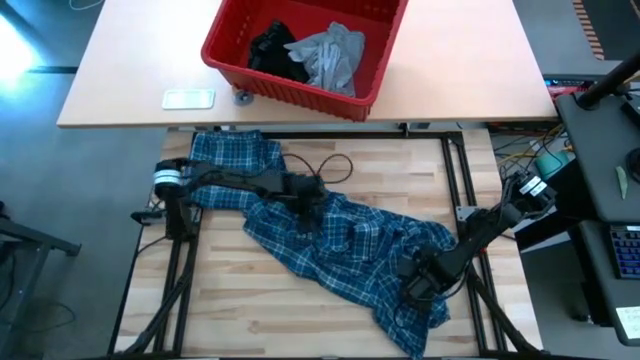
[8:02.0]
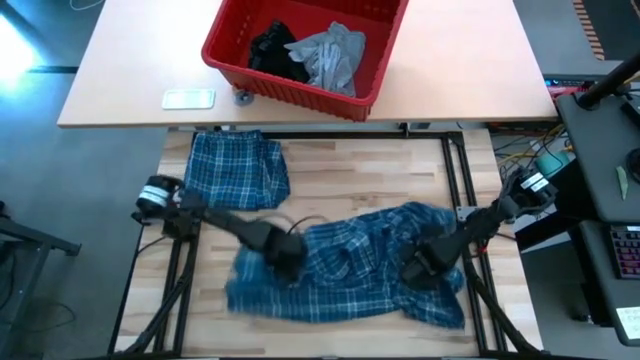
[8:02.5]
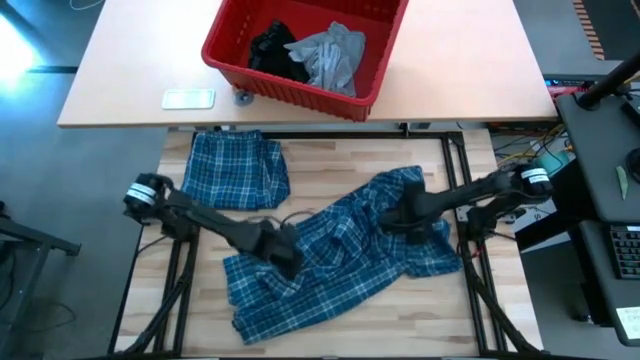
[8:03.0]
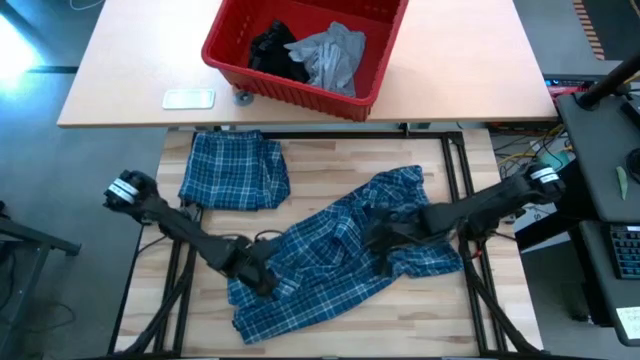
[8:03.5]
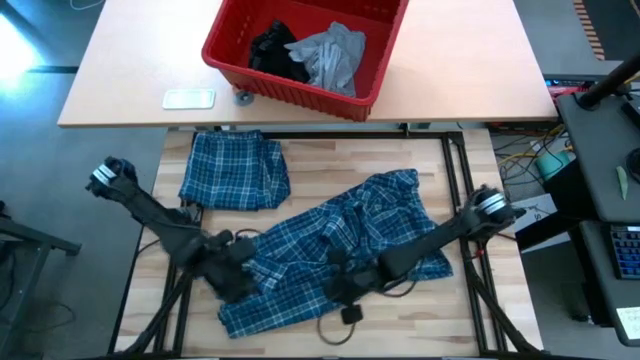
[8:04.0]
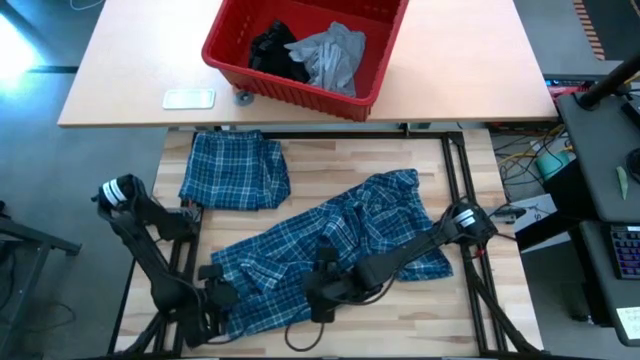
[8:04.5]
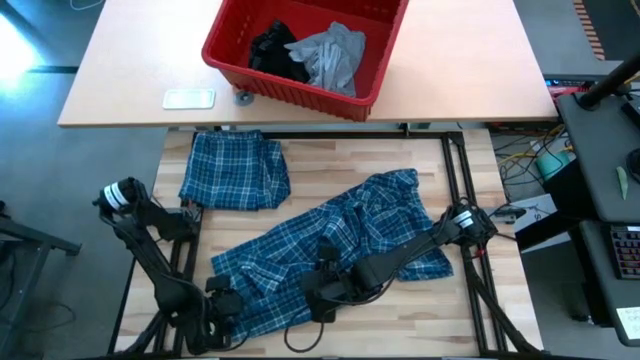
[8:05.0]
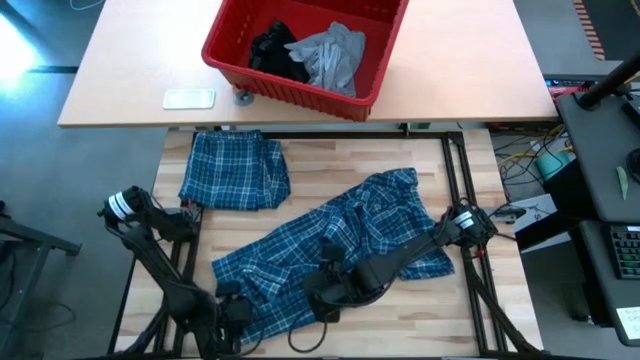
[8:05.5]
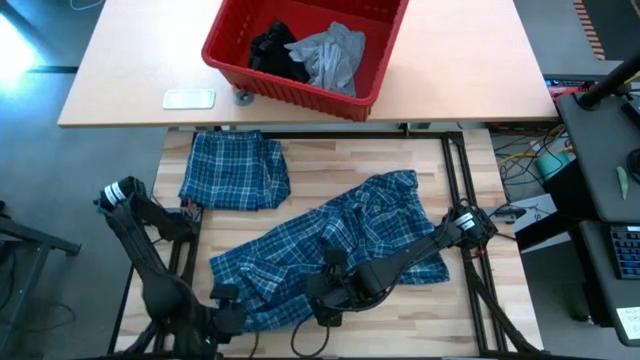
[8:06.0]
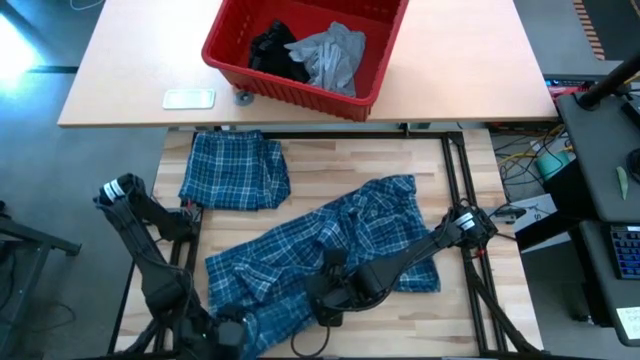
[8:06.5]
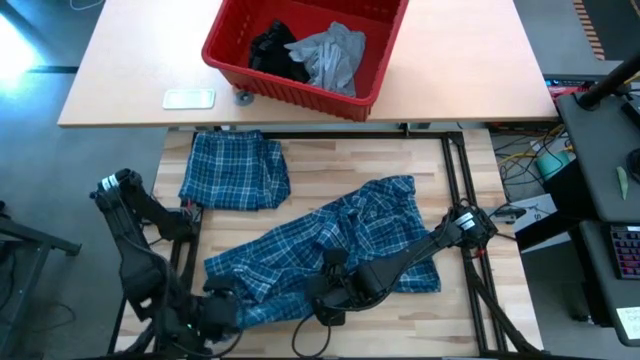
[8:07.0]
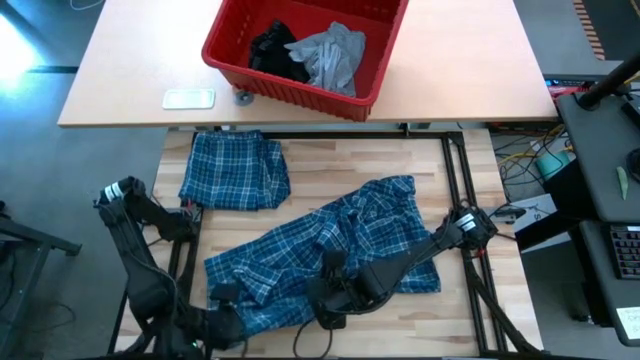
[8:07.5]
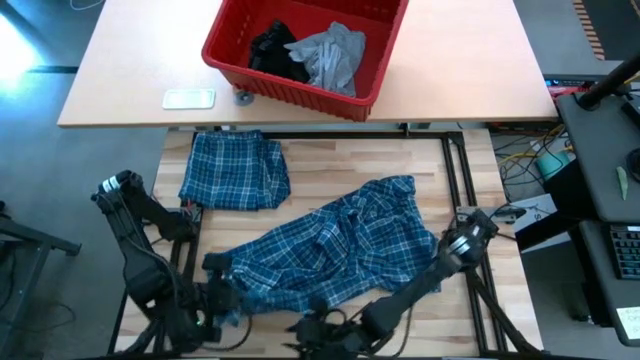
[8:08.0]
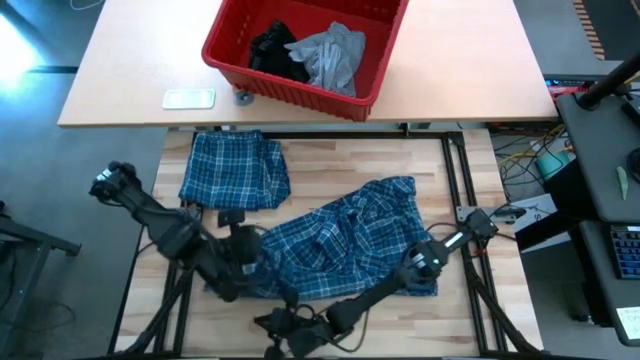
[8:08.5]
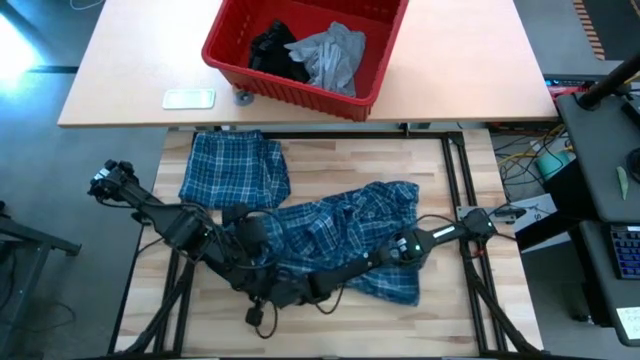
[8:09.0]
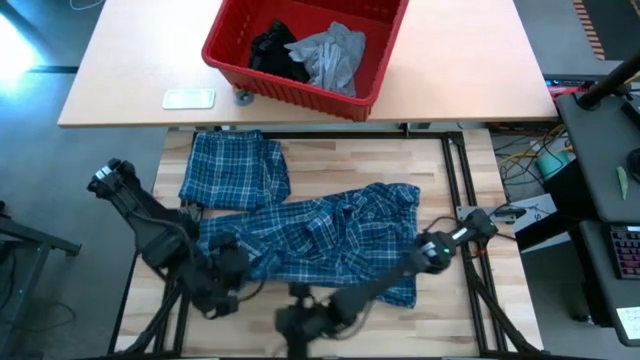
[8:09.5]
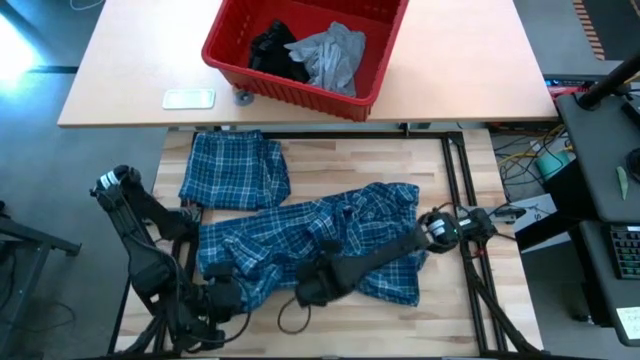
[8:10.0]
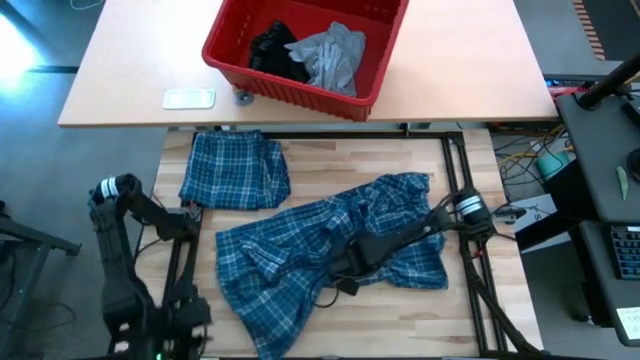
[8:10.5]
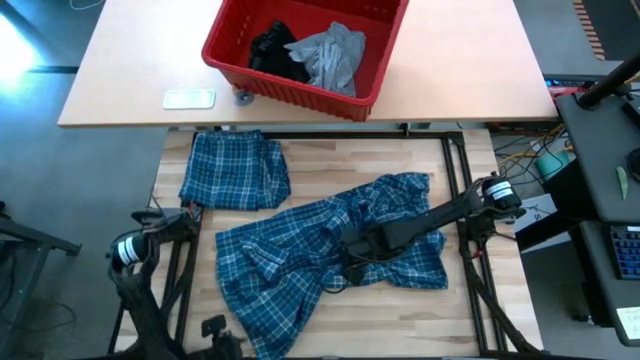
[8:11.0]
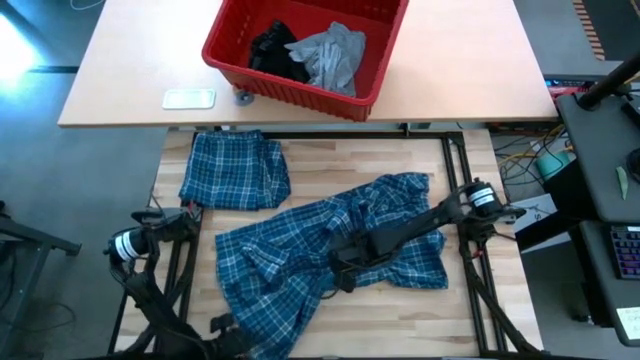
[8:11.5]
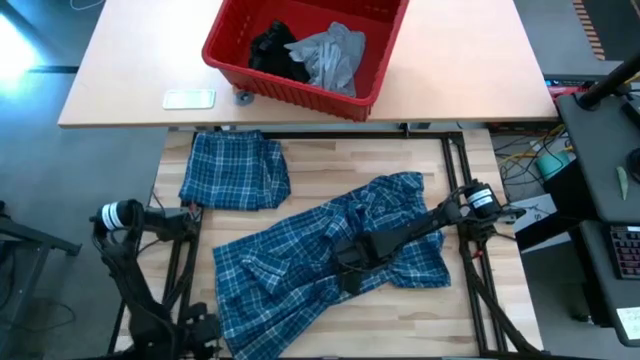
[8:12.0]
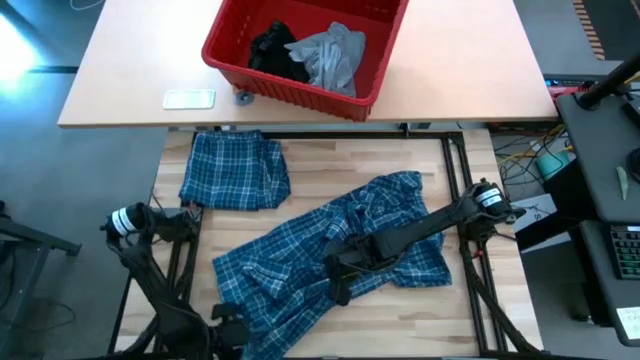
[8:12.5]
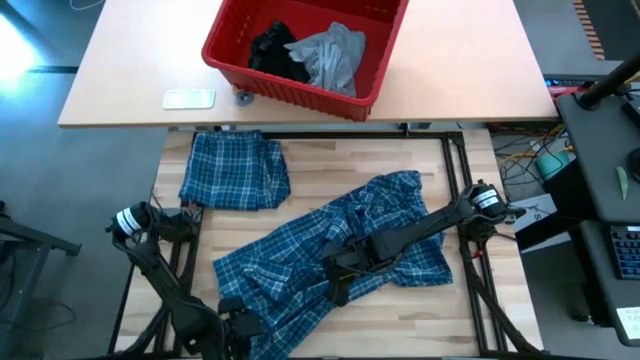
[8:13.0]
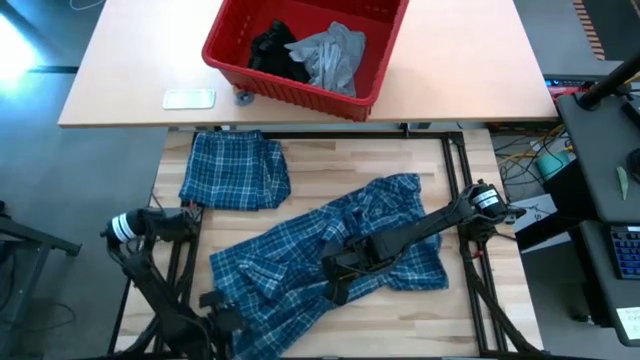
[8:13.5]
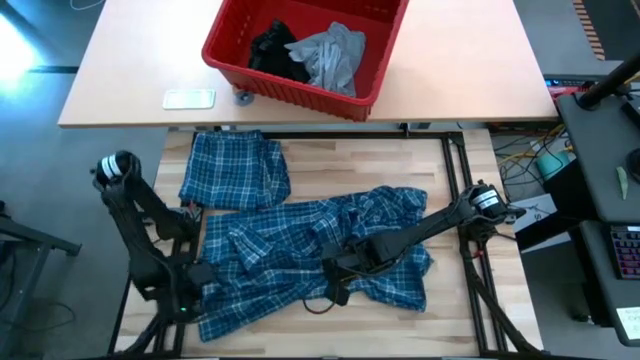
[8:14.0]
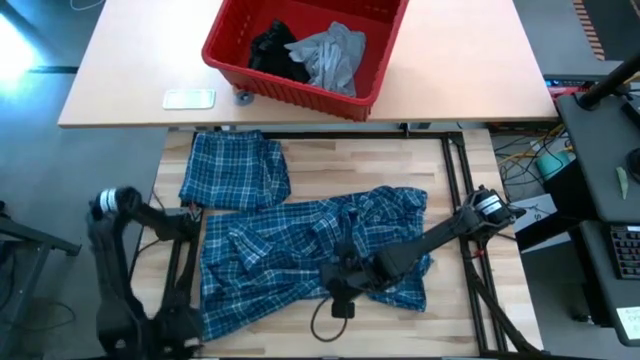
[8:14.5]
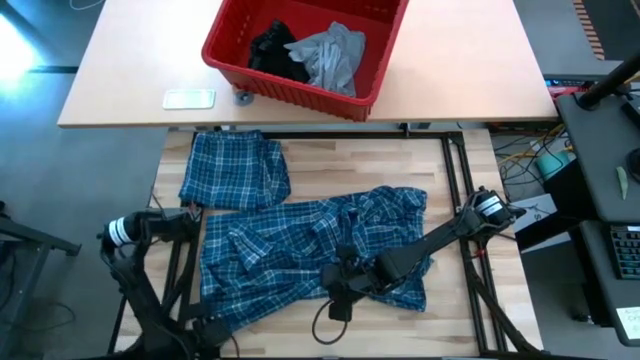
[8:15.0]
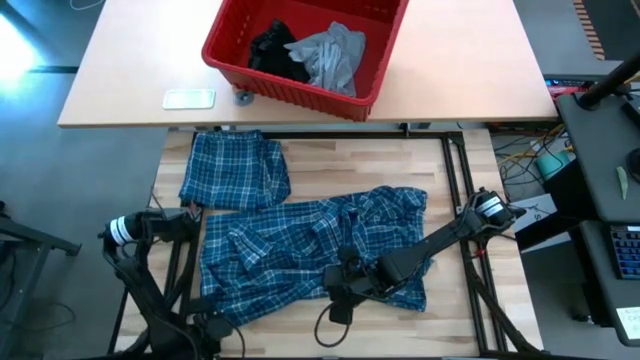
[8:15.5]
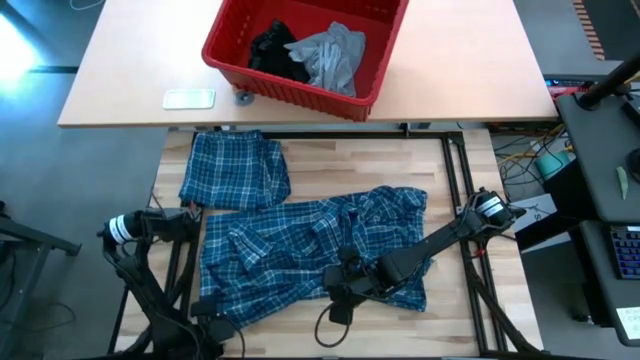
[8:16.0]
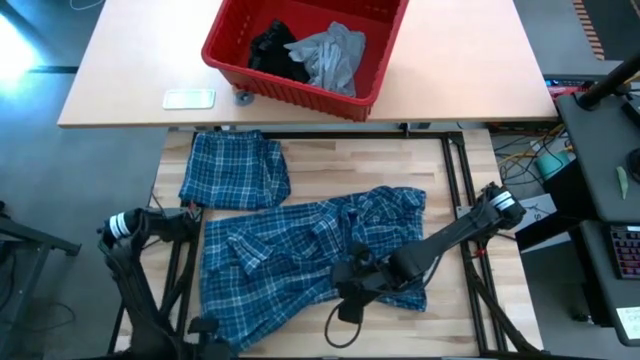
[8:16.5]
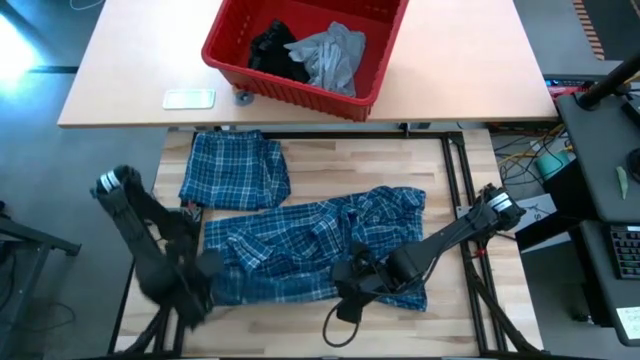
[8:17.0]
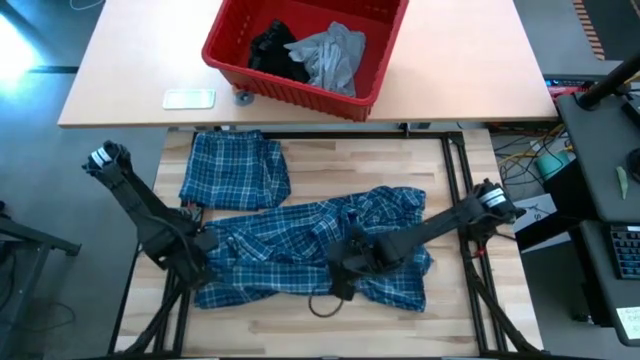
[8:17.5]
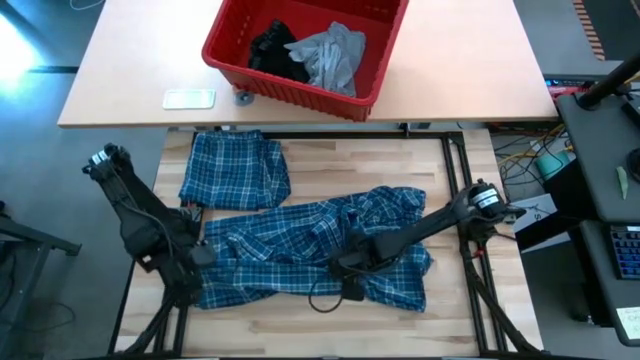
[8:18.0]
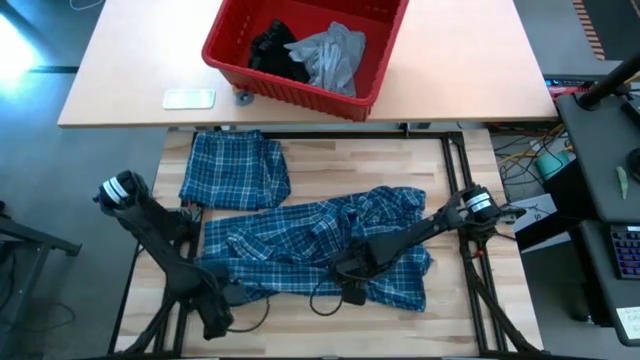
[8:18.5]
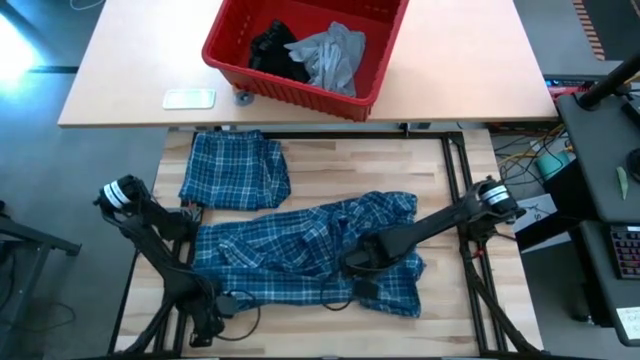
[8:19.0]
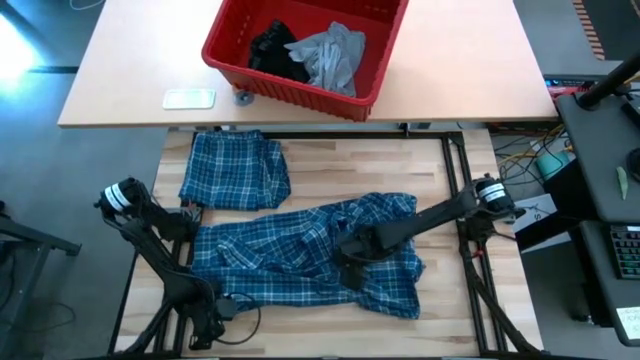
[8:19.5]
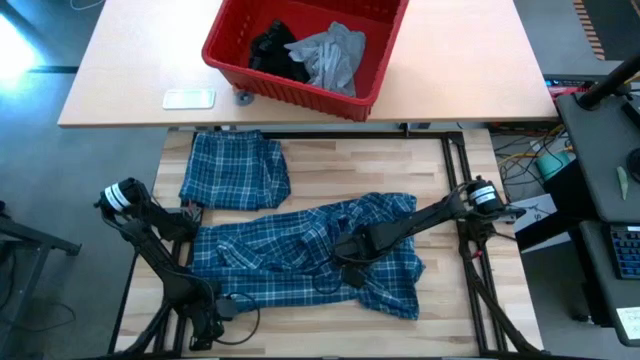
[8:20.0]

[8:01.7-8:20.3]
Task: Fold Laundry from Bin
Fold the blue patterned long sleeve shirt

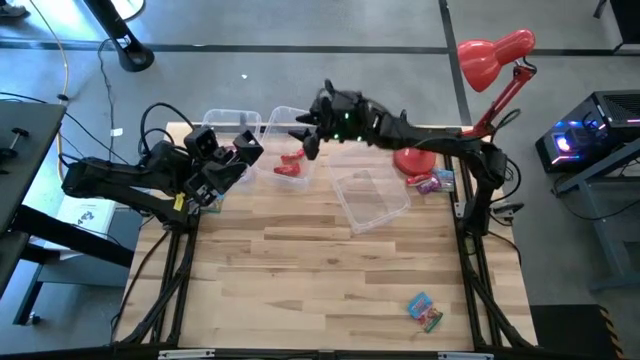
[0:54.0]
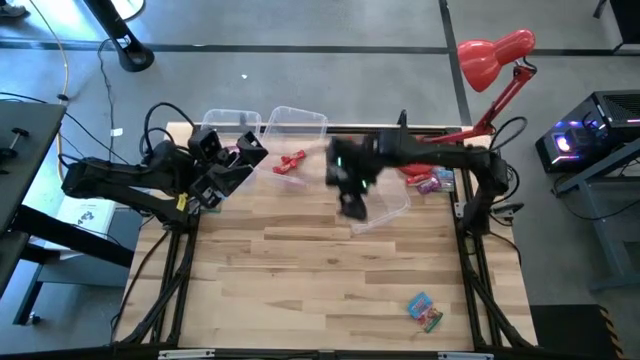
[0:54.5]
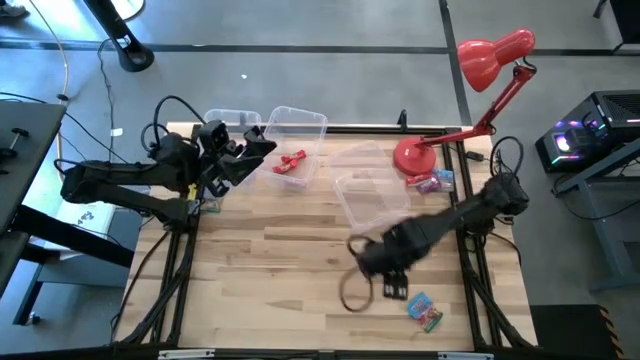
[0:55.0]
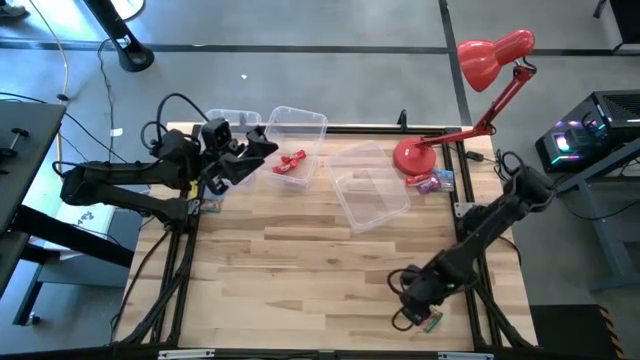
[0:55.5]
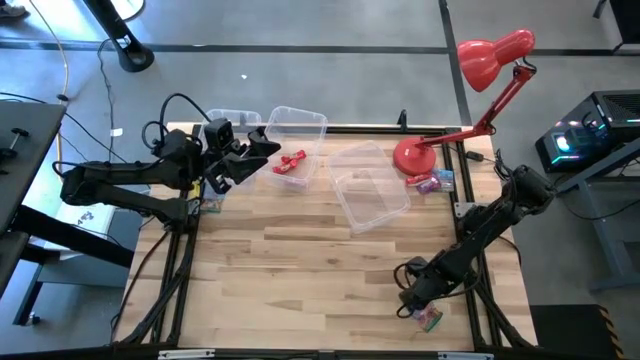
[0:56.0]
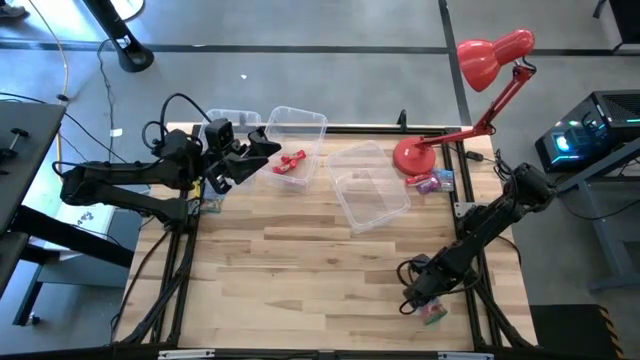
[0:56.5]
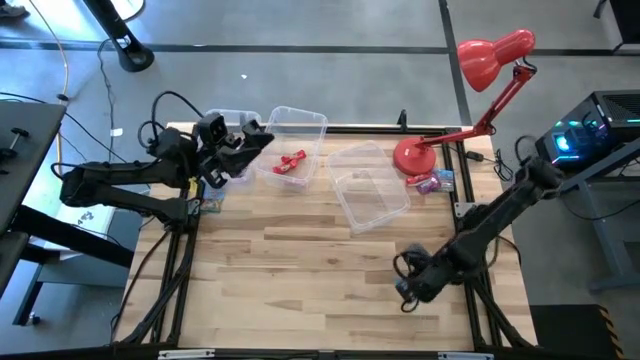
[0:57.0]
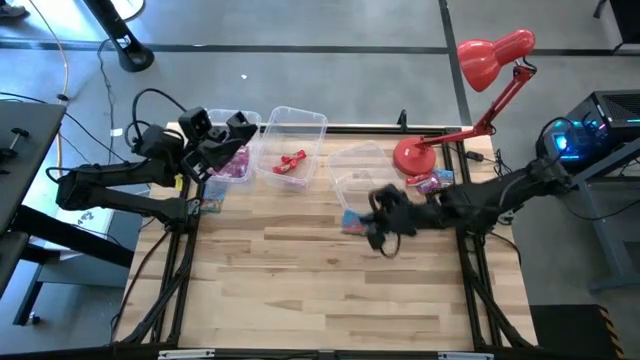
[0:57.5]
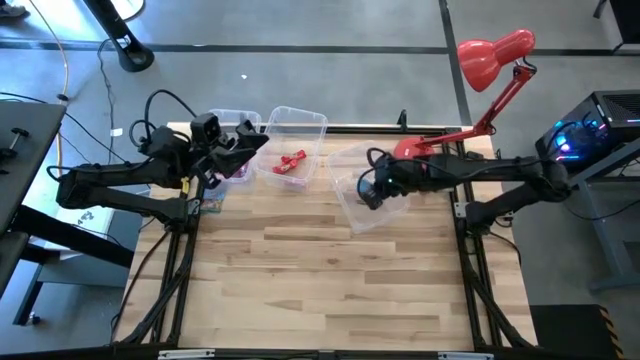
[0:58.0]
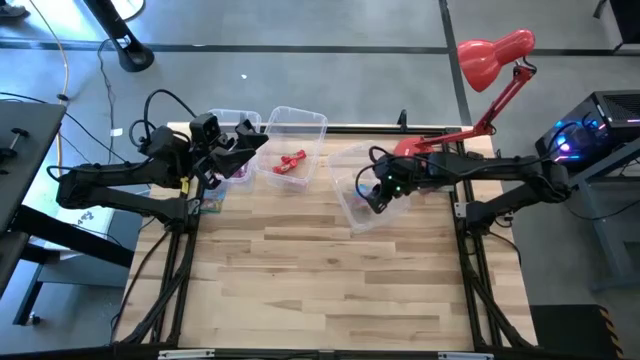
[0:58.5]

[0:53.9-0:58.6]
Task: Sort candy
Put the blue candy bag into the right transparent bin
